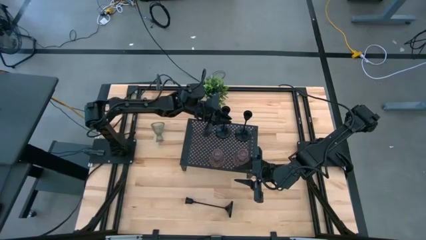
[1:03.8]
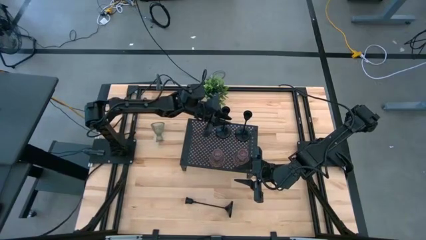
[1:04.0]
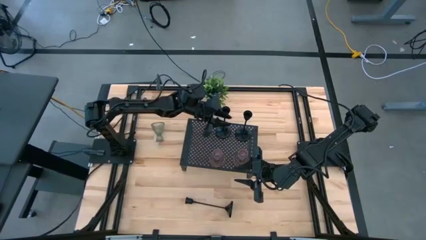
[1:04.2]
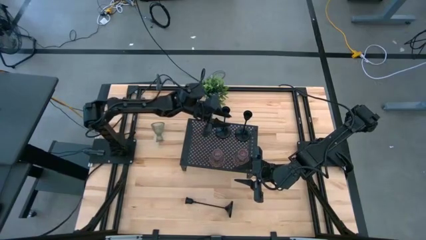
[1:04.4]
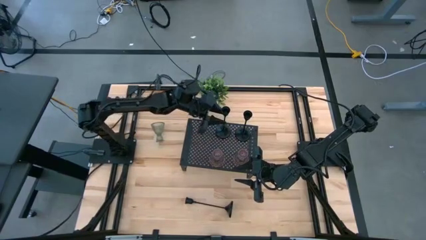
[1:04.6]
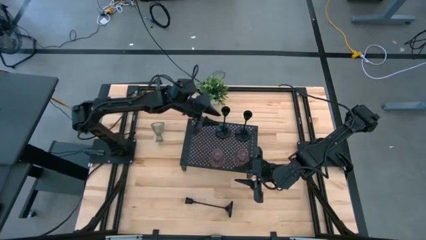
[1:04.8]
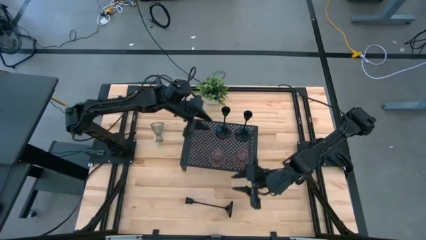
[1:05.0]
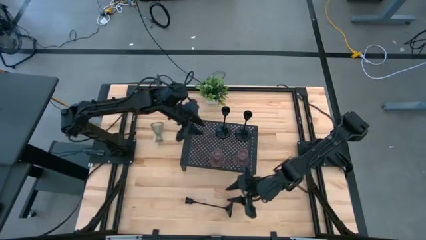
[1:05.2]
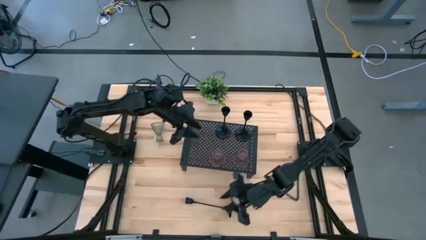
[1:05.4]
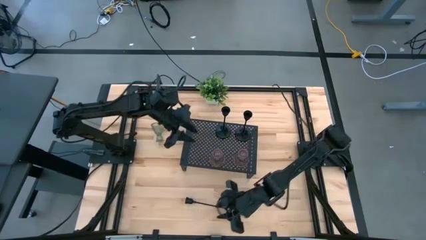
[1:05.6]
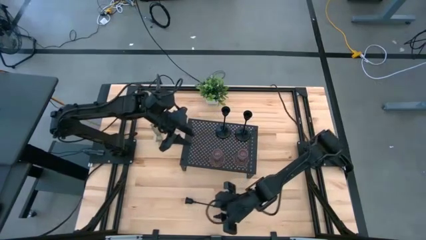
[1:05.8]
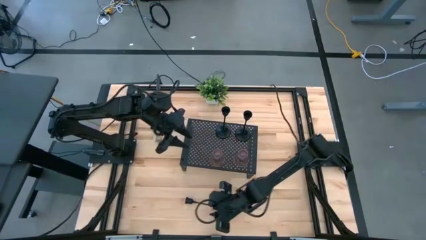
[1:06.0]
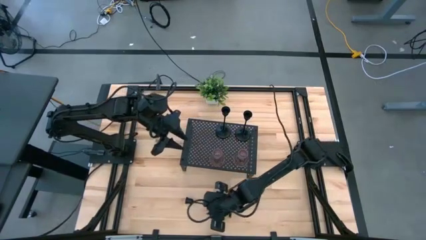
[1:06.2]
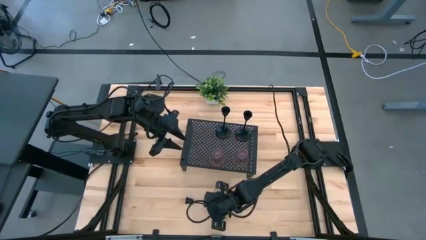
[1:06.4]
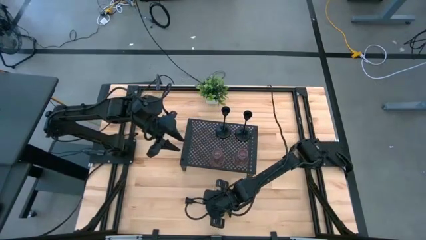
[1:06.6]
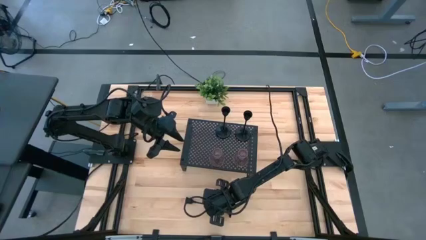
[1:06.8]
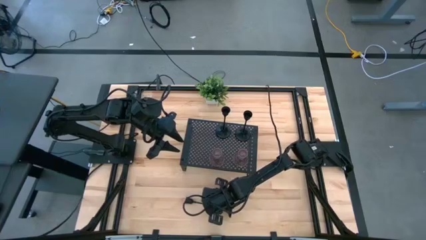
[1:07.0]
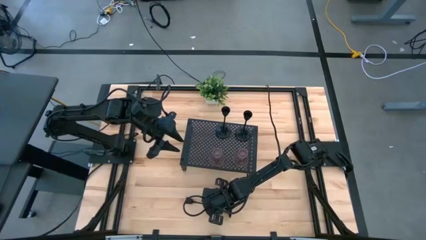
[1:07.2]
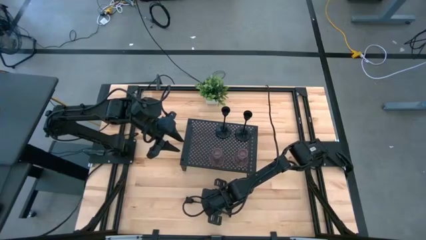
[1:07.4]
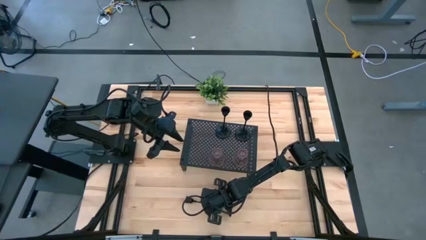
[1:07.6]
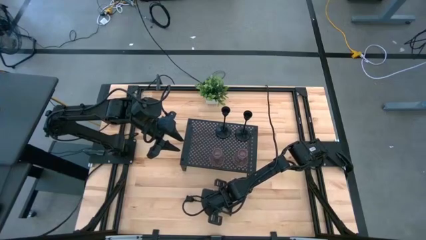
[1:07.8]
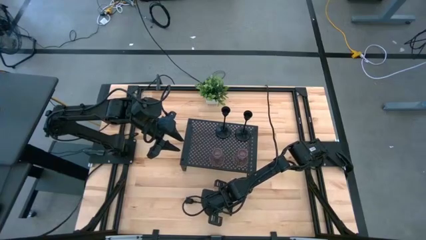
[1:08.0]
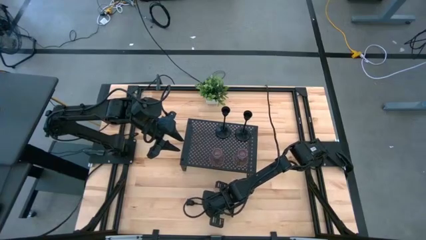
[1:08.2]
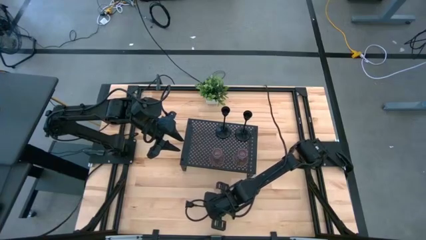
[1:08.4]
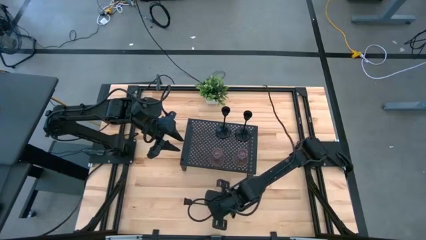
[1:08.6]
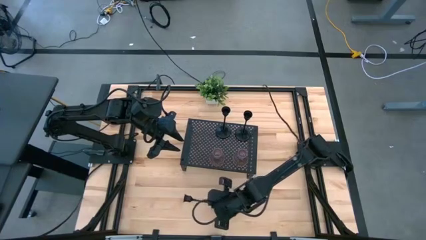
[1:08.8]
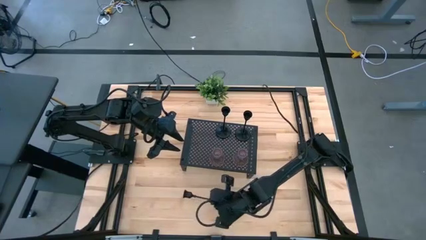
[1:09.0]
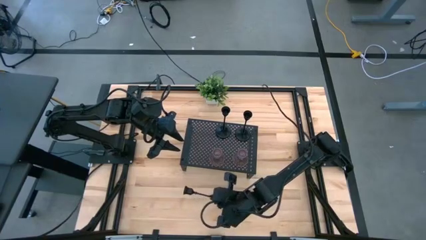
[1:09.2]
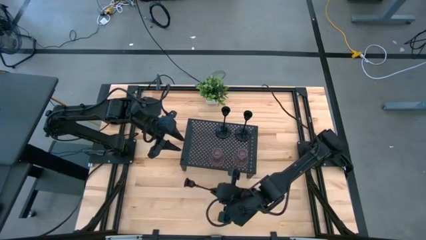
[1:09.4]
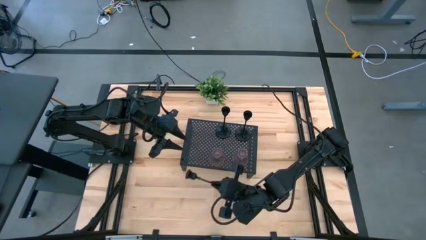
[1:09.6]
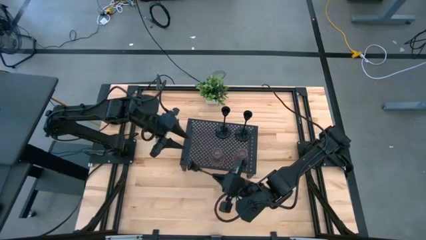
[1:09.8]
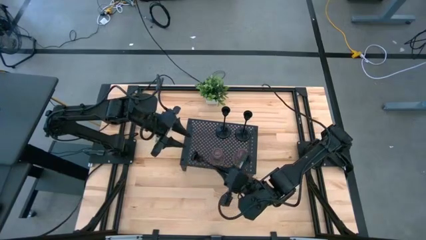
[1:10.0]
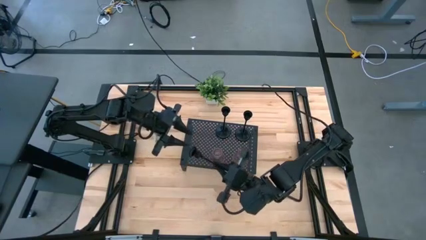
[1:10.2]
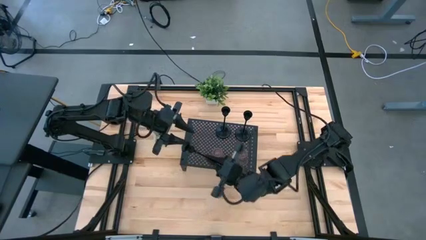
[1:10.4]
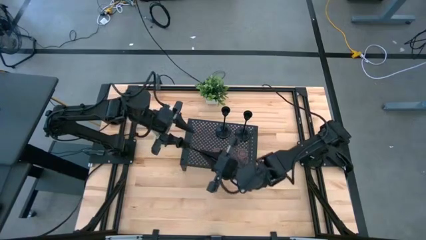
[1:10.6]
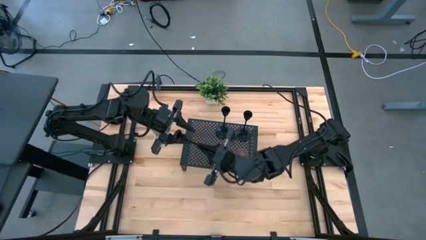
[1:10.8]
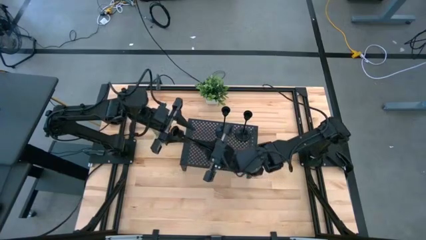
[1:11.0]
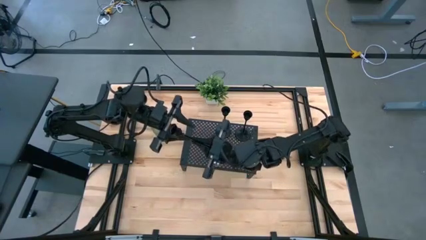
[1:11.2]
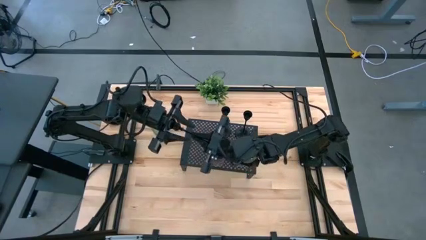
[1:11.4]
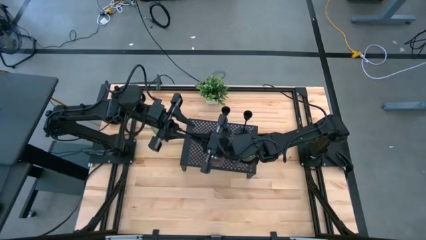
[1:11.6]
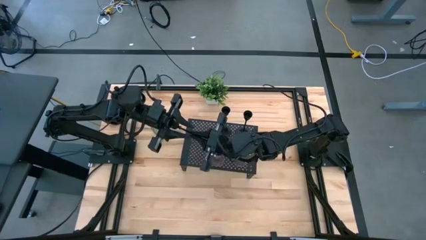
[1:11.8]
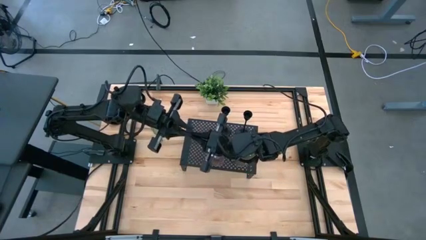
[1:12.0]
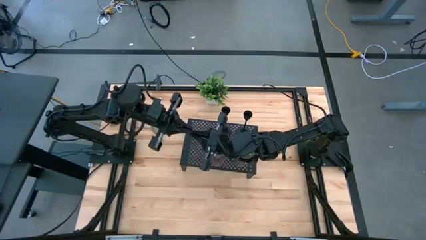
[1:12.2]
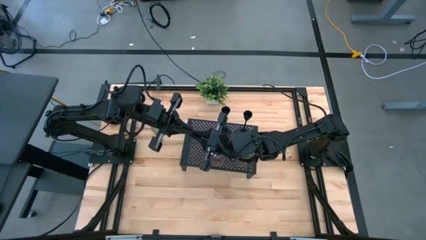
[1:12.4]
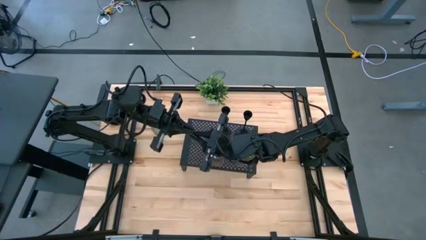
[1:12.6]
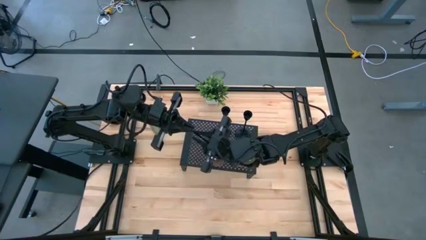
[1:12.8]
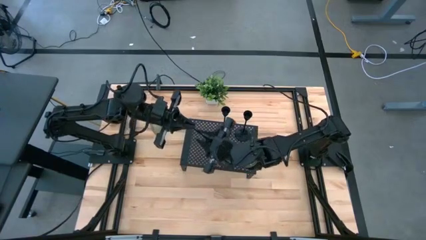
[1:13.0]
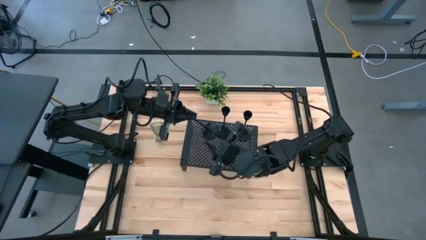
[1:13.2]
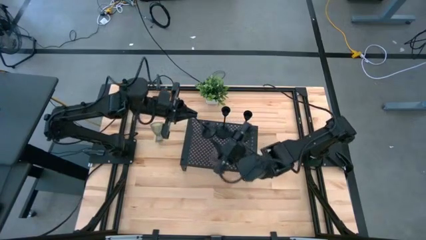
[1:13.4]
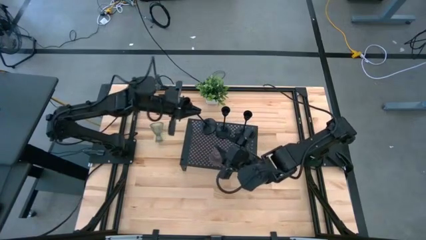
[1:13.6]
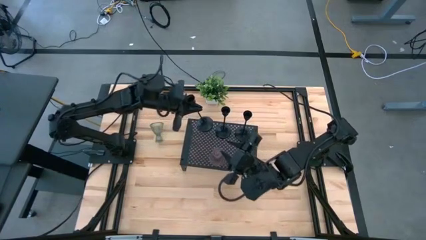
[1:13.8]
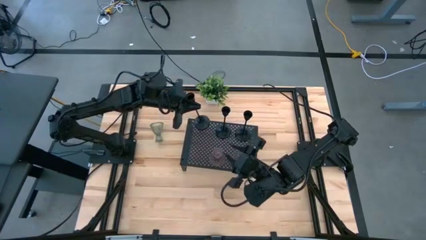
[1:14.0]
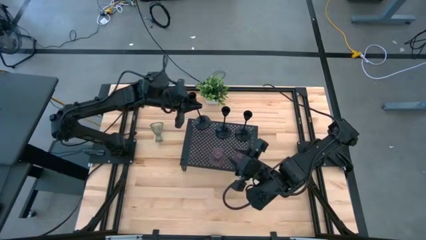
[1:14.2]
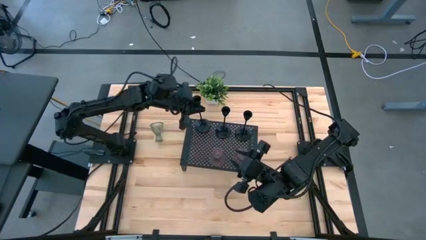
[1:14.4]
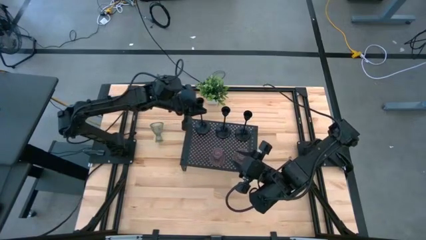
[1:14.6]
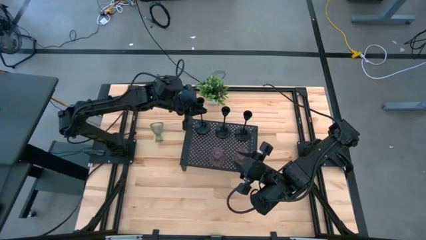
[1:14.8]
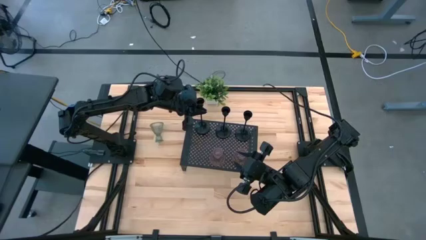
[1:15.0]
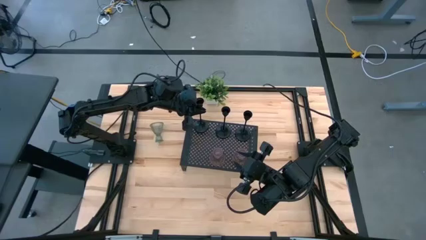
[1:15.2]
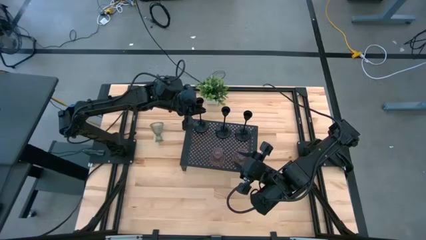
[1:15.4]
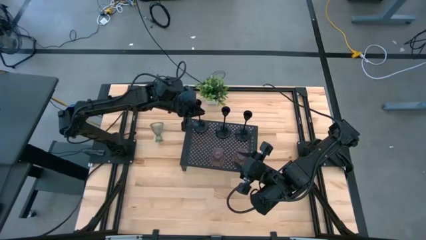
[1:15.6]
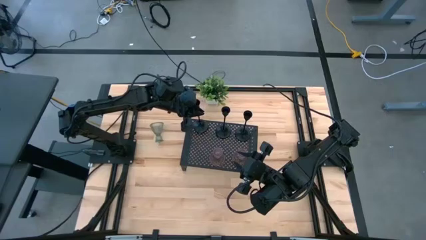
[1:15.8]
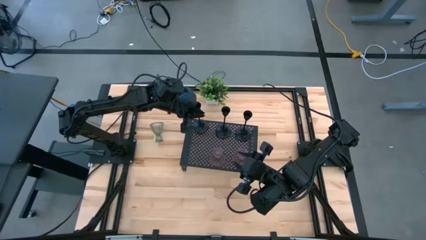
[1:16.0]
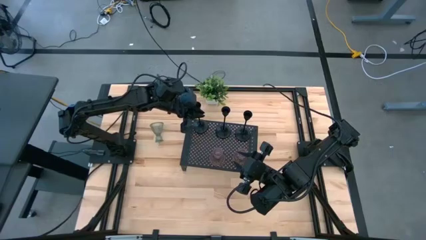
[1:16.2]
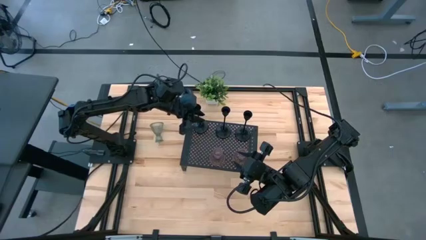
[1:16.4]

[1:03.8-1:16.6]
Task: Pick & Place candle stick holders
Put the black candle holder on the shelf
